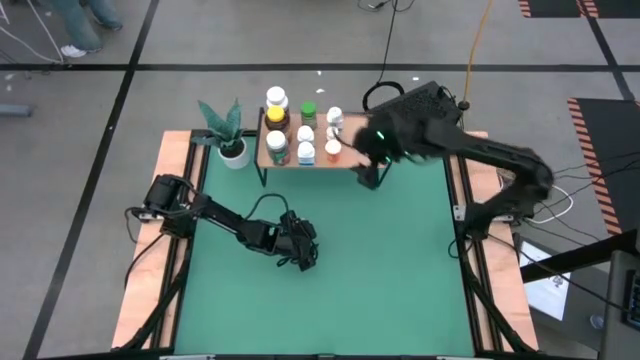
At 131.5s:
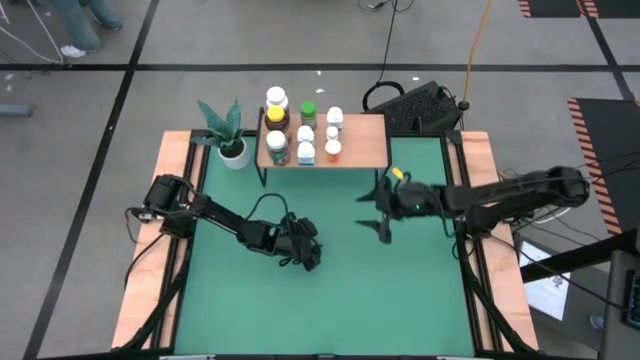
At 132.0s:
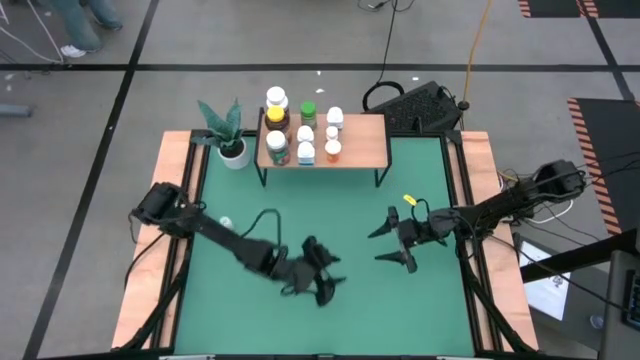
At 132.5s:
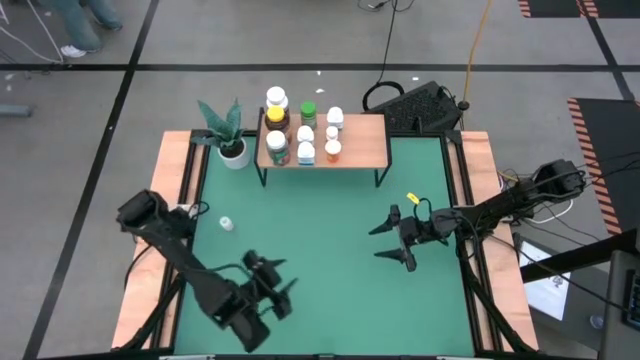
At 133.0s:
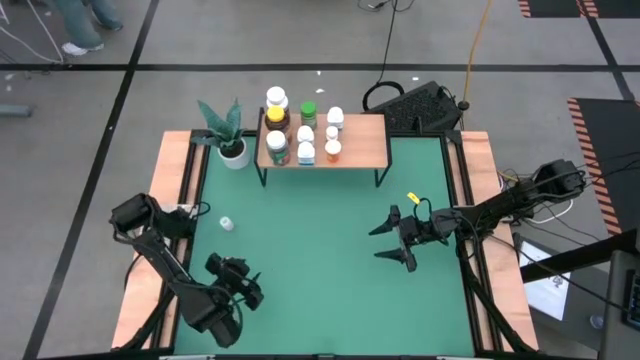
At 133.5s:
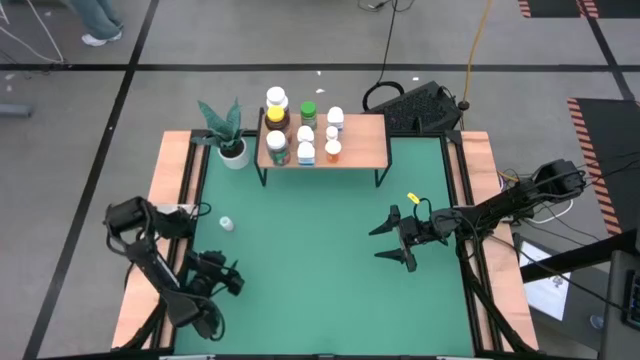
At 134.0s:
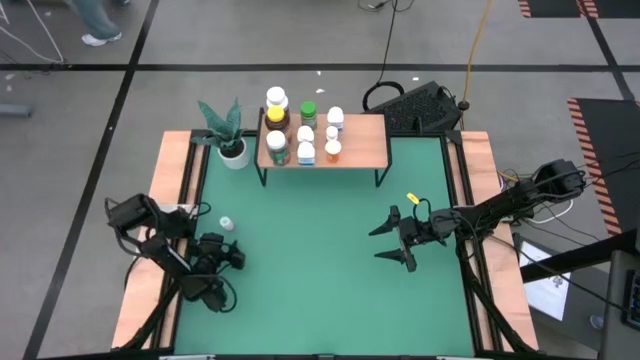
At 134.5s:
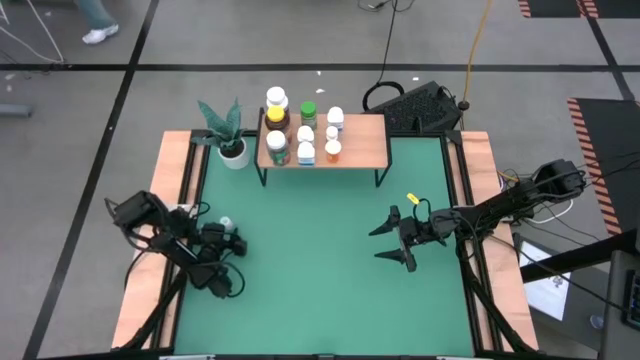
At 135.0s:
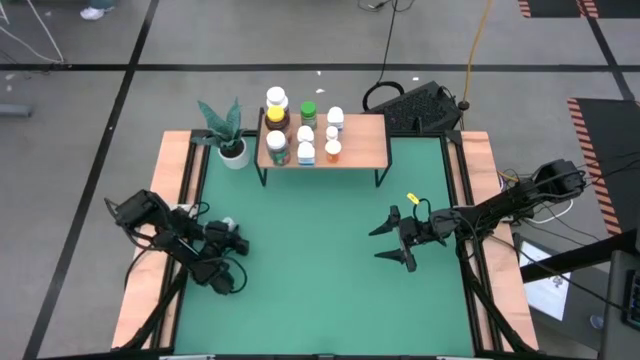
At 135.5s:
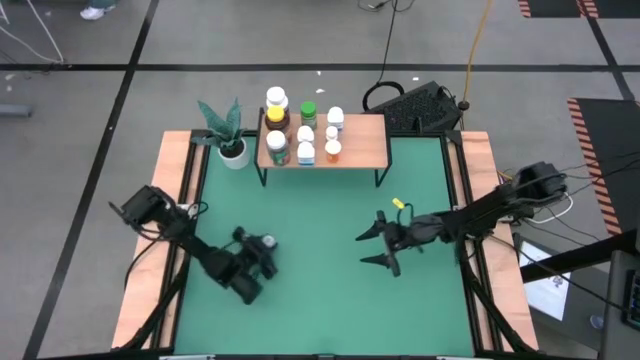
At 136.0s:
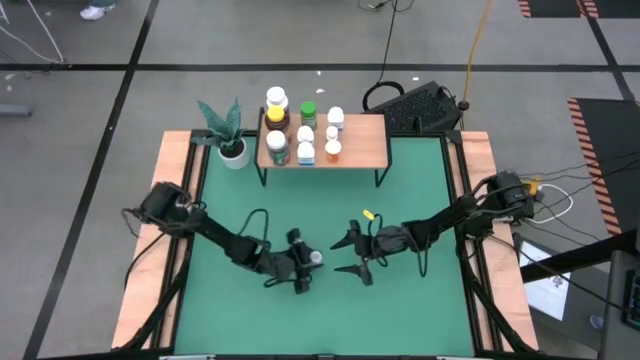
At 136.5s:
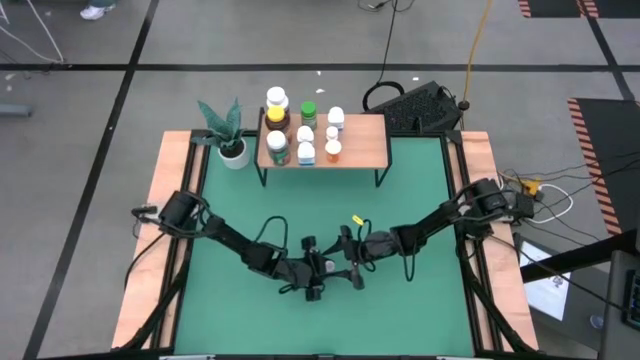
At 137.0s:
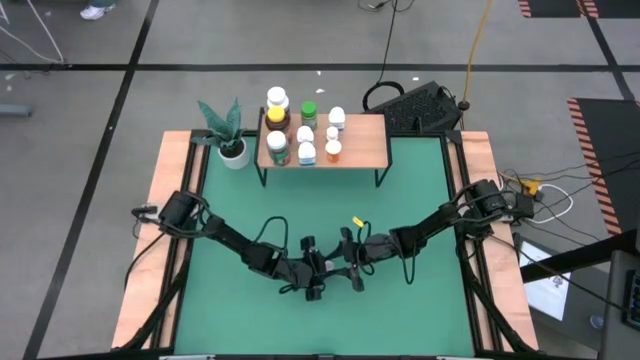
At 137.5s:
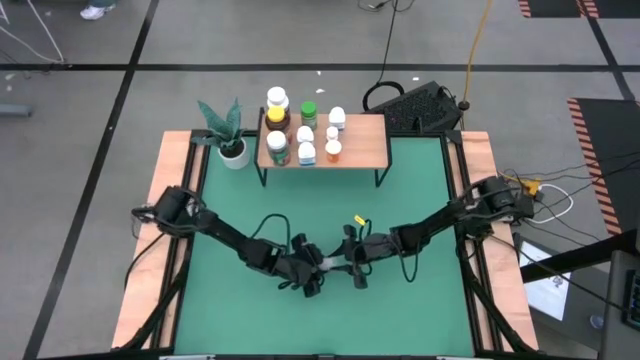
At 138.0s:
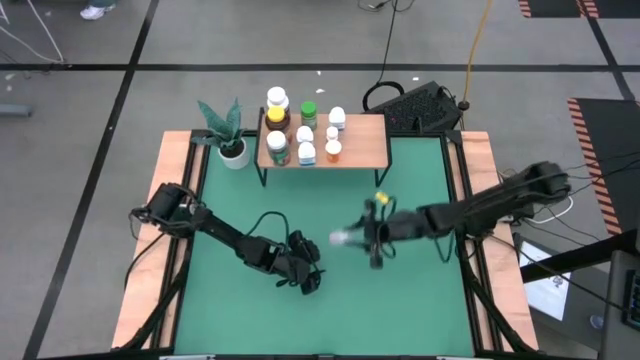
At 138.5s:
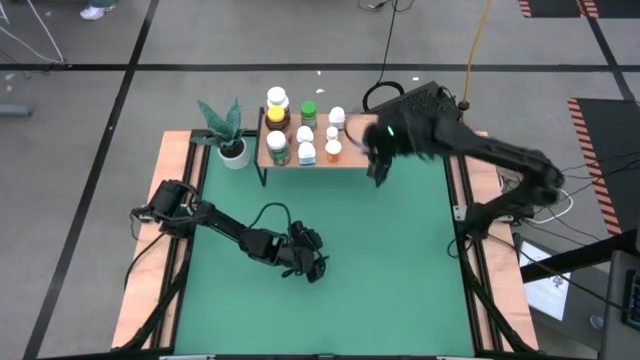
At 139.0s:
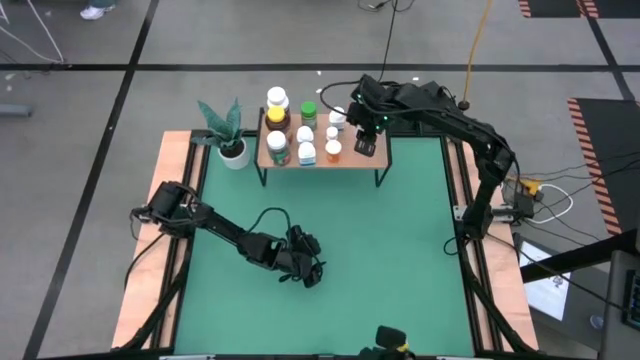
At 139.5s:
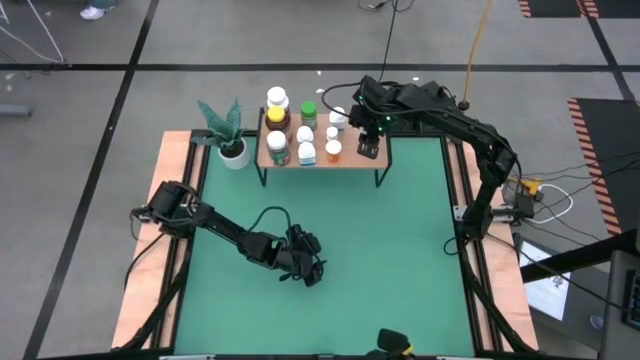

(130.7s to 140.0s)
Task: Pick and place medicine bottles onto shelf by color
Put the transparent pill bottle on the shelf

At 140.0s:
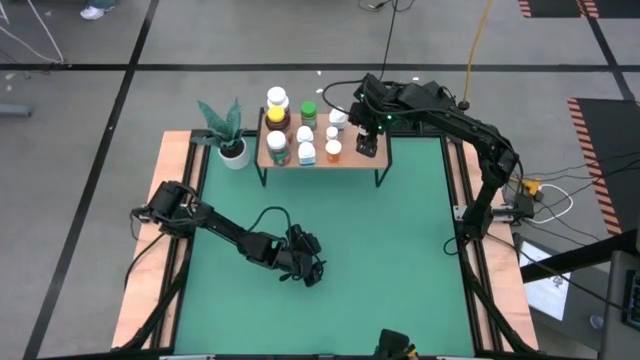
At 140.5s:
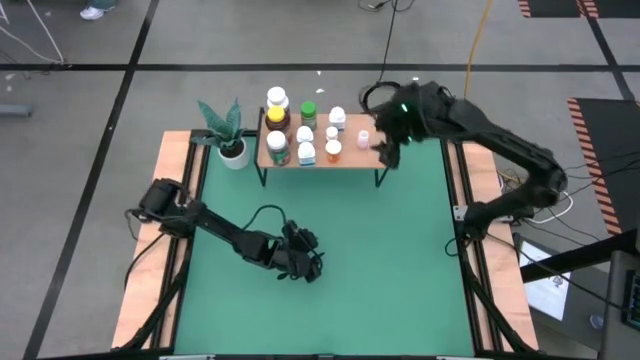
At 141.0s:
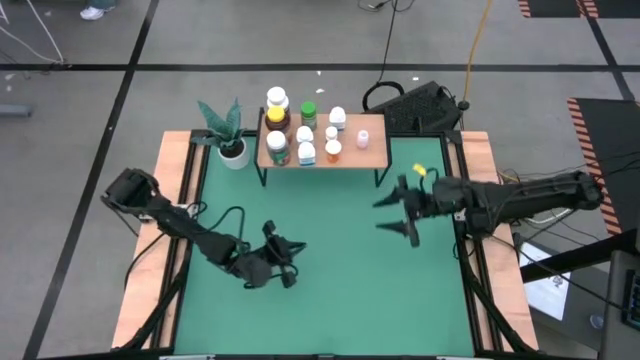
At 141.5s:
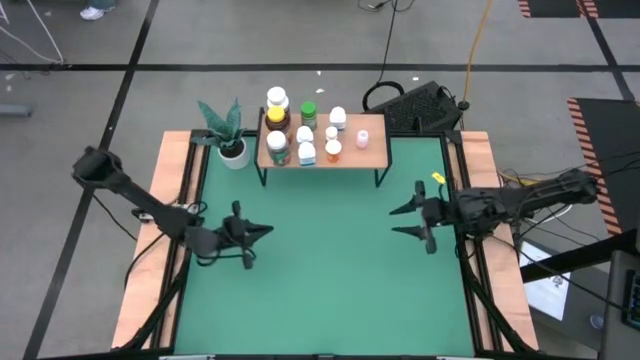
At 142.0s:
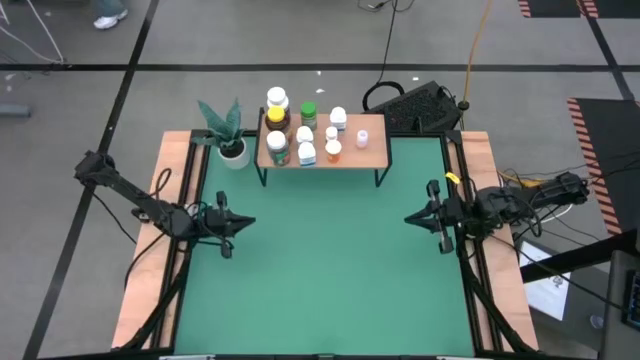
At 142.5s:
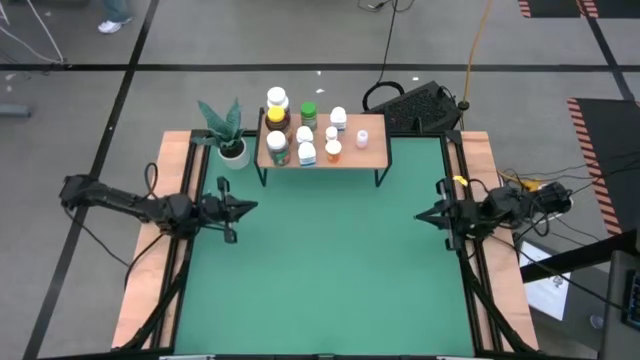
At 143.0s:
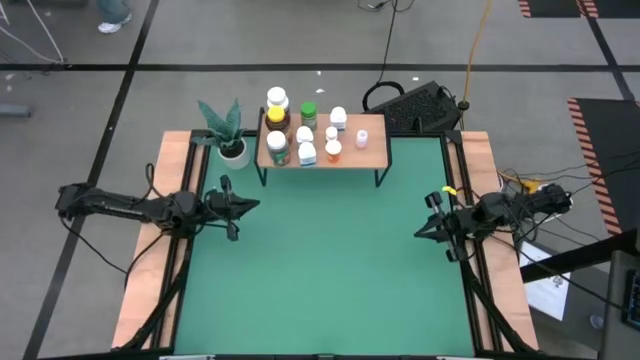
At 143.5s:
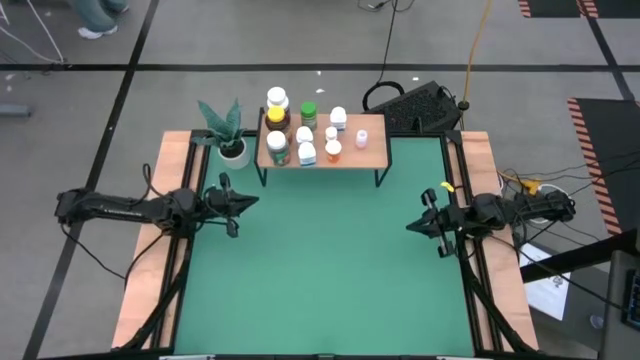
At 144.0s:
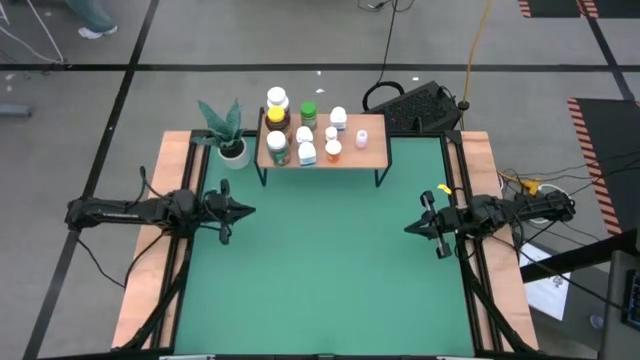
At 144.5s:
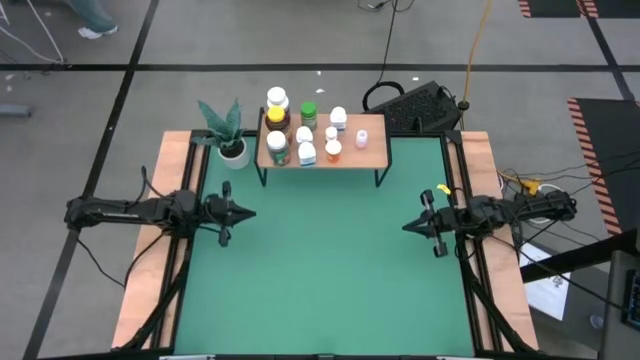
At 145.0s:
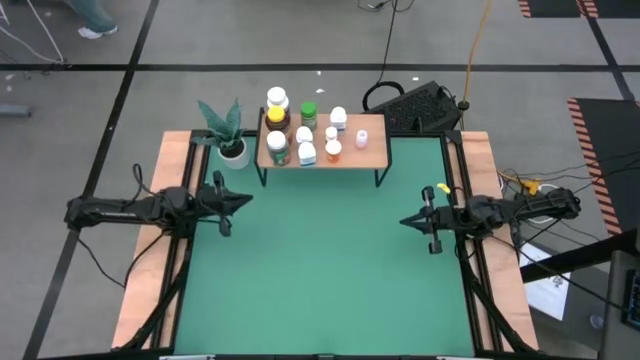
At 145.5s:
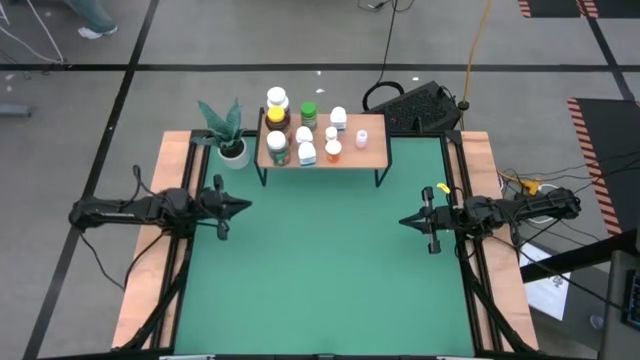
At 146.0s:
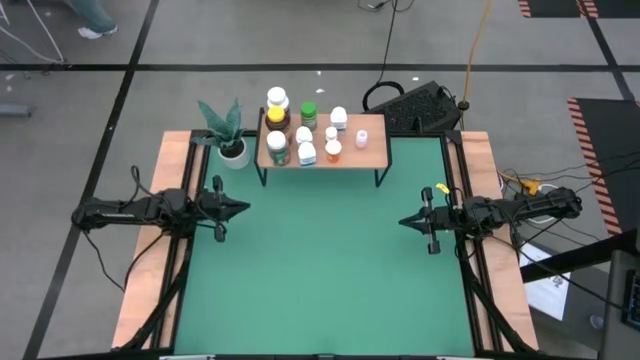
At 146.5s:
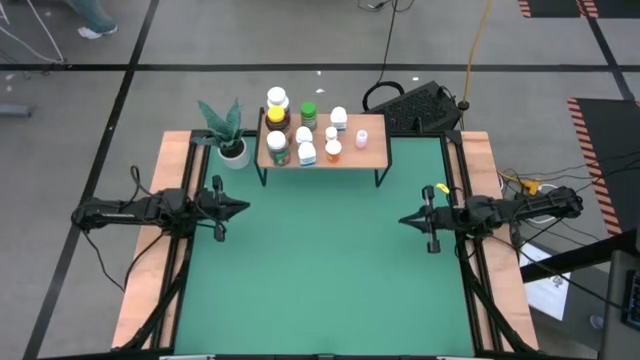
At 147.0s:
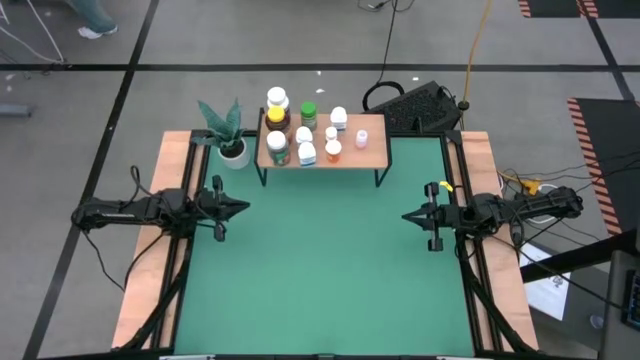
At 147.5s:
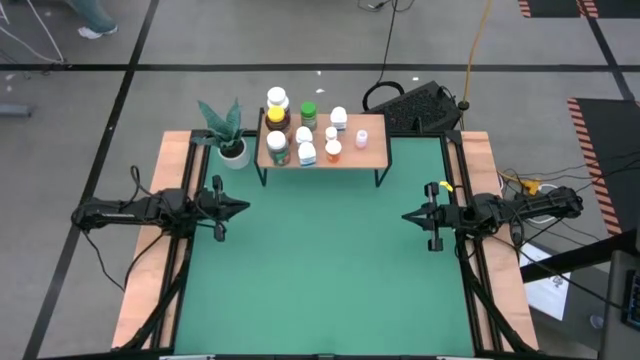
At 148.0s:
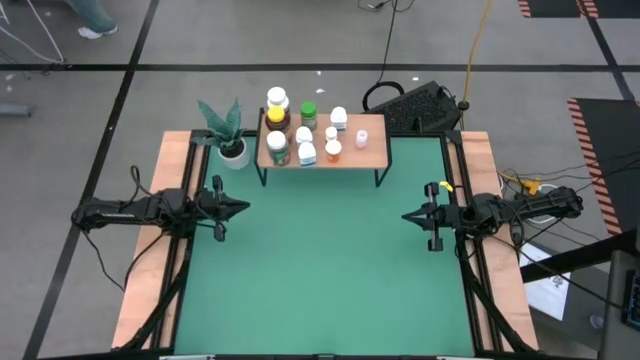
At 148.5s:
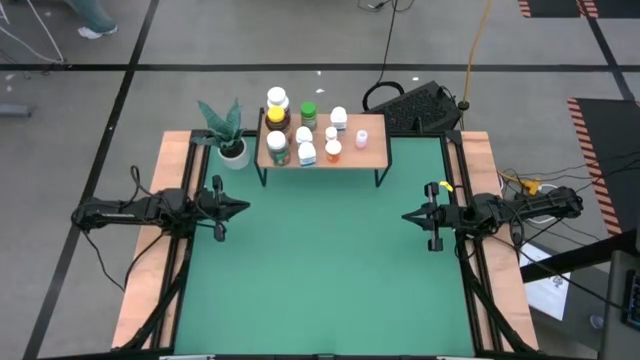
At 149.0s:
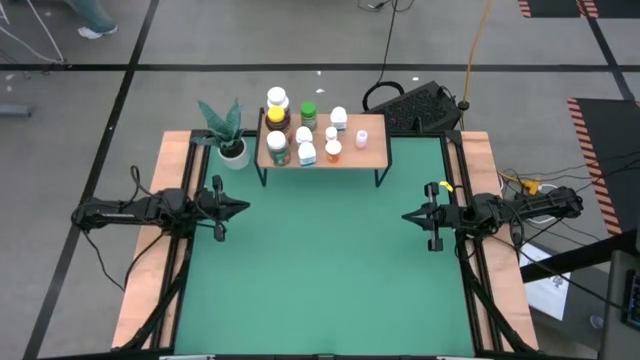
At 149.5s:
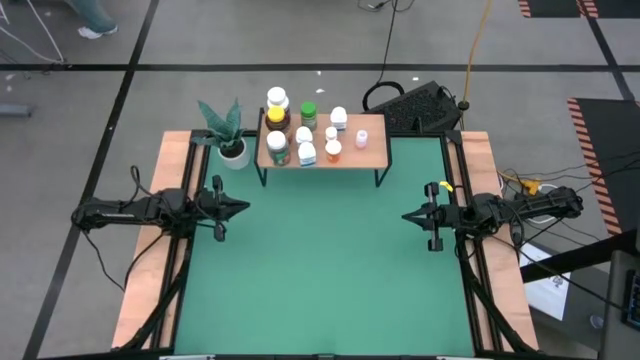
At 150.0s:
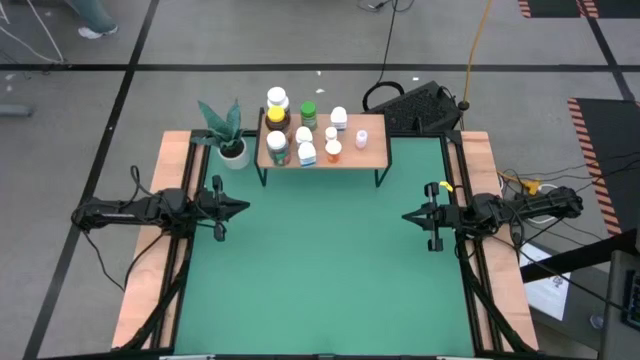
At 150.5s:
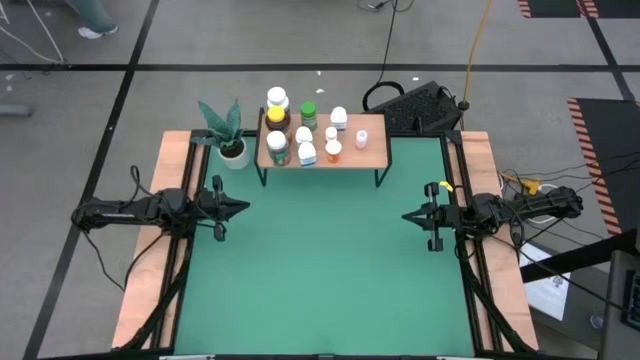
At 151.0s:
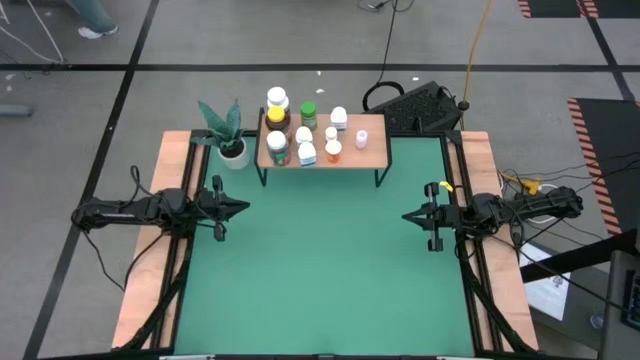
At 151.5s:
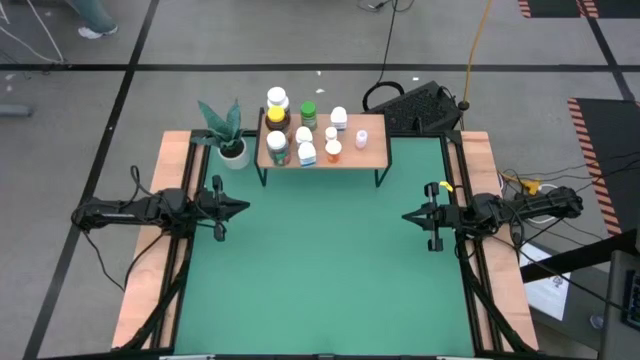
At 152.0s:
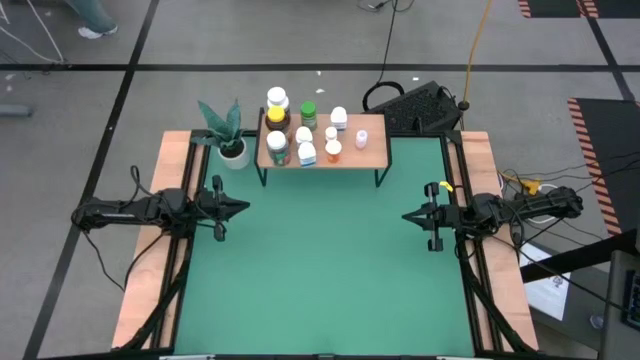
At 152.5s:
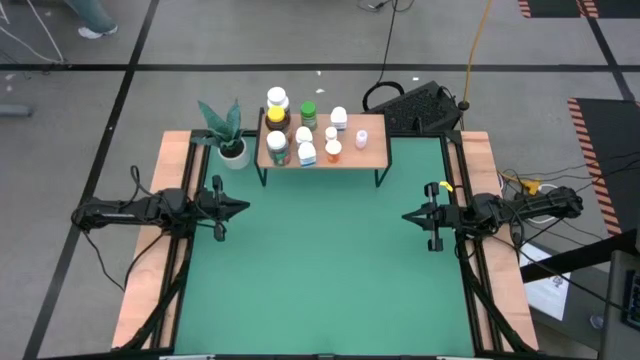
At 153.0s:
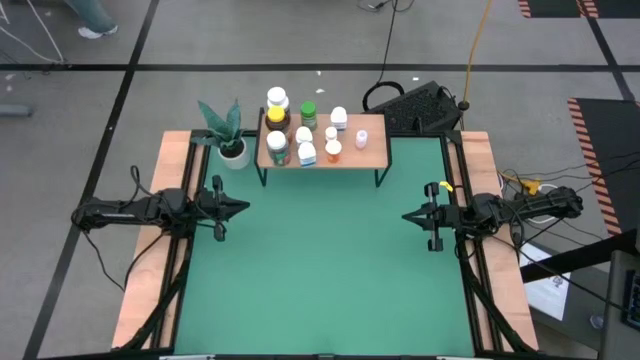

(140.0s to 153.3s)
Return to Home Position
